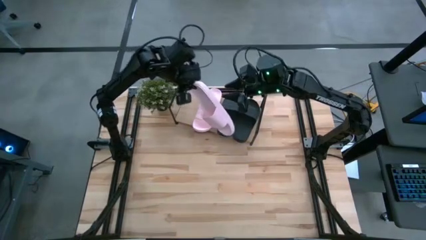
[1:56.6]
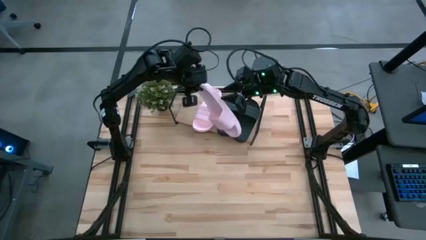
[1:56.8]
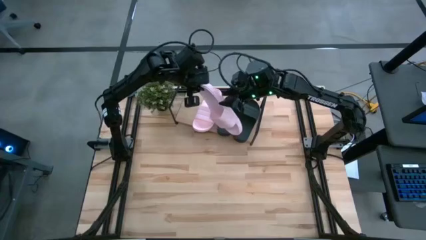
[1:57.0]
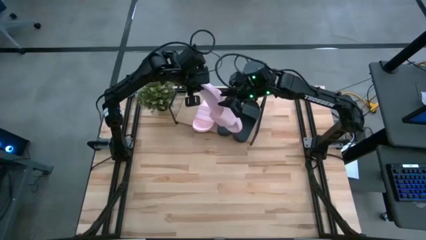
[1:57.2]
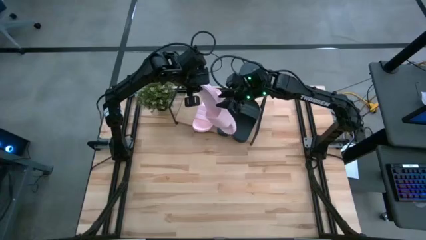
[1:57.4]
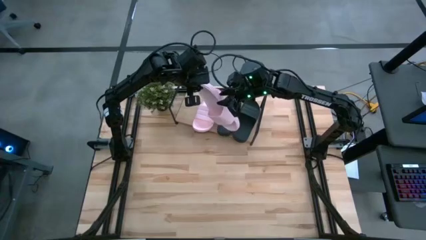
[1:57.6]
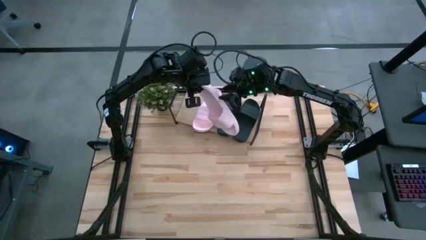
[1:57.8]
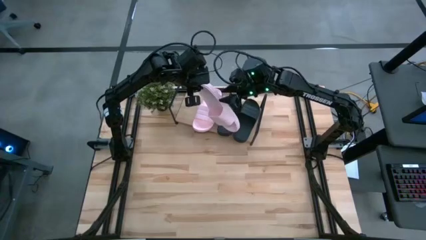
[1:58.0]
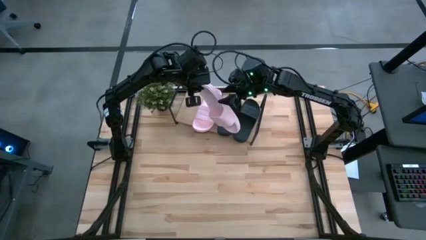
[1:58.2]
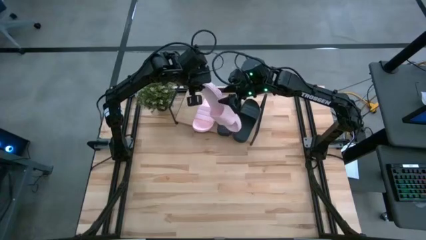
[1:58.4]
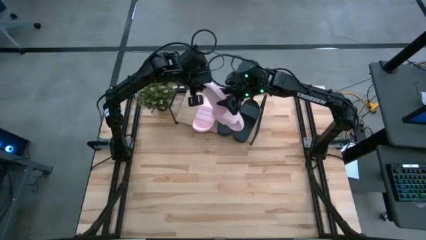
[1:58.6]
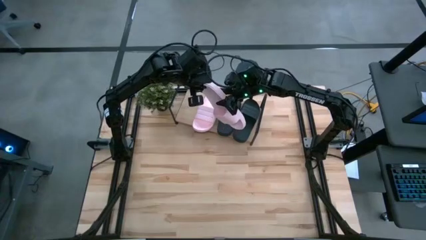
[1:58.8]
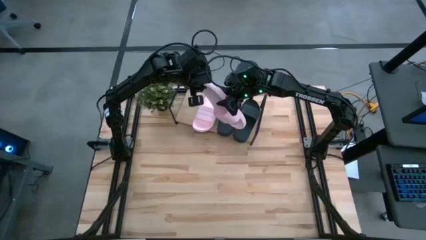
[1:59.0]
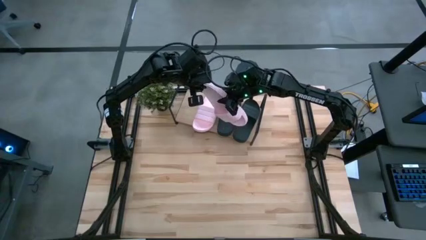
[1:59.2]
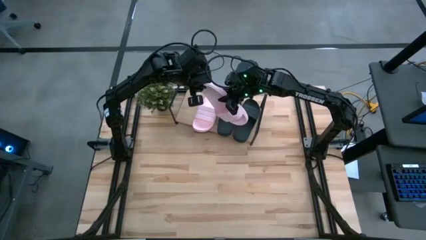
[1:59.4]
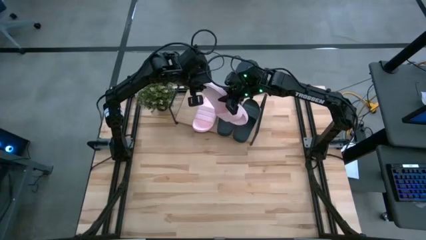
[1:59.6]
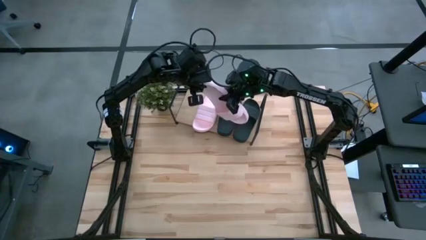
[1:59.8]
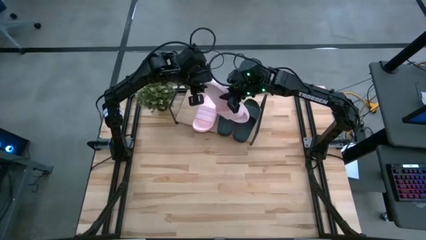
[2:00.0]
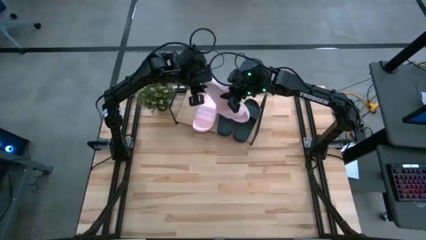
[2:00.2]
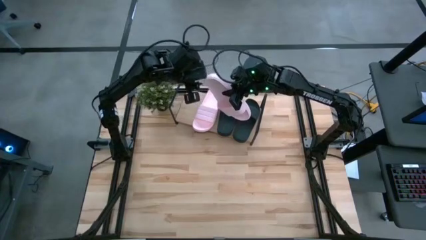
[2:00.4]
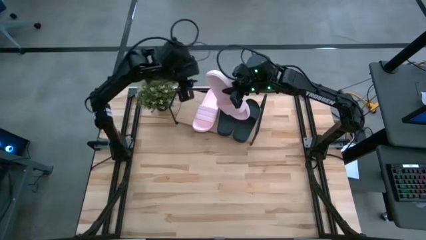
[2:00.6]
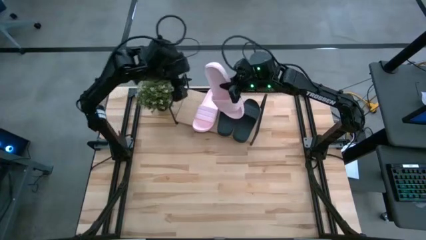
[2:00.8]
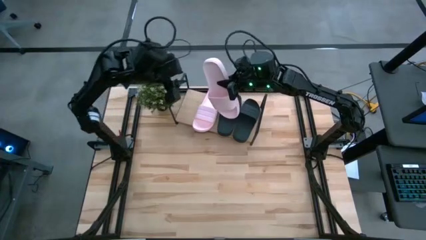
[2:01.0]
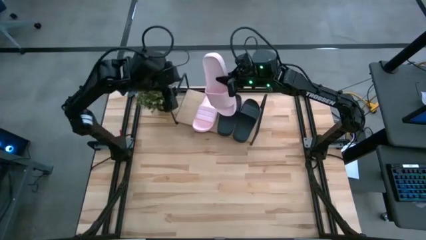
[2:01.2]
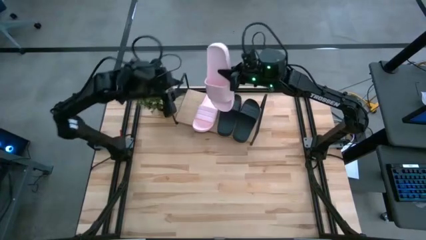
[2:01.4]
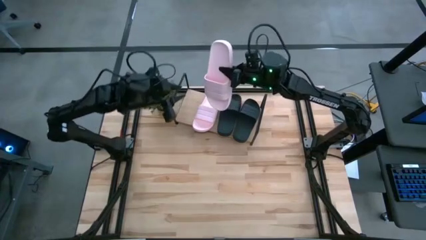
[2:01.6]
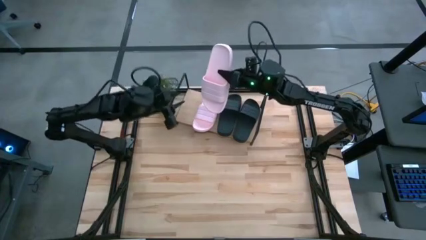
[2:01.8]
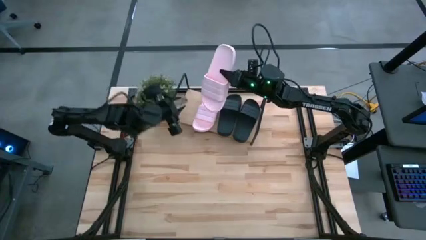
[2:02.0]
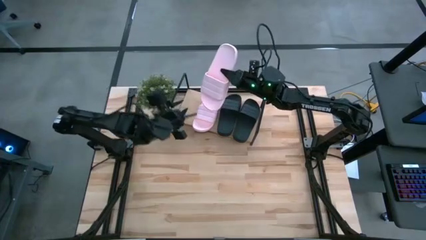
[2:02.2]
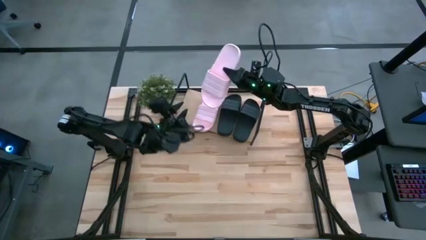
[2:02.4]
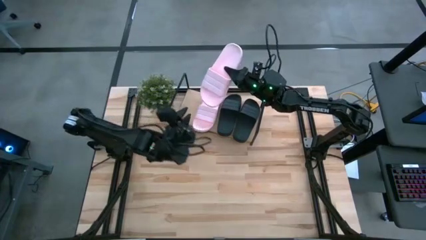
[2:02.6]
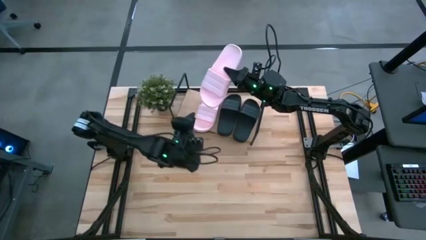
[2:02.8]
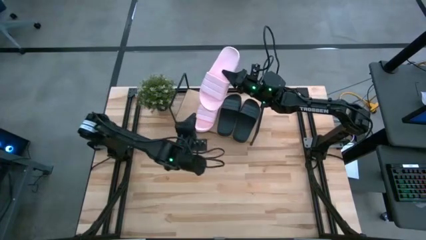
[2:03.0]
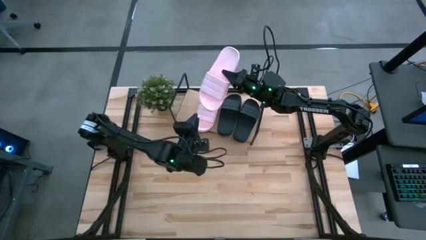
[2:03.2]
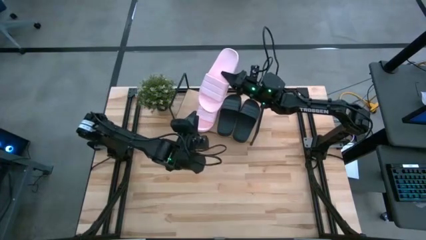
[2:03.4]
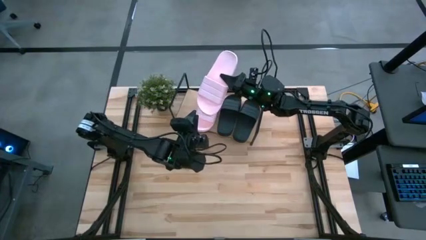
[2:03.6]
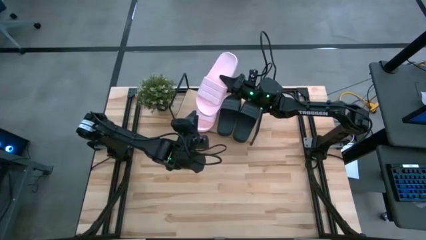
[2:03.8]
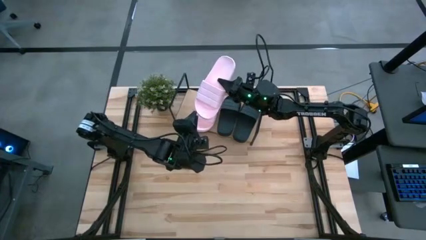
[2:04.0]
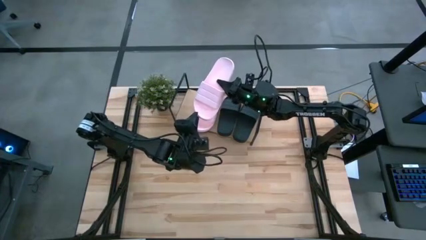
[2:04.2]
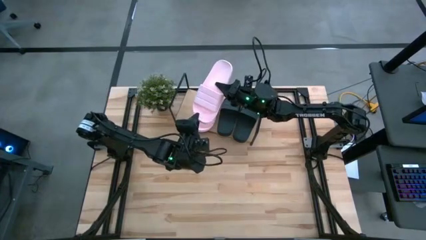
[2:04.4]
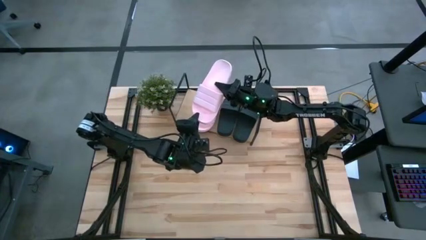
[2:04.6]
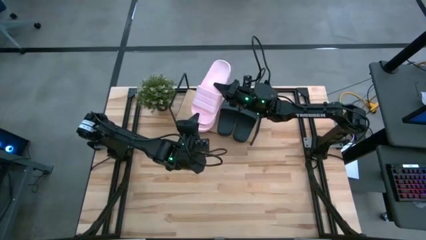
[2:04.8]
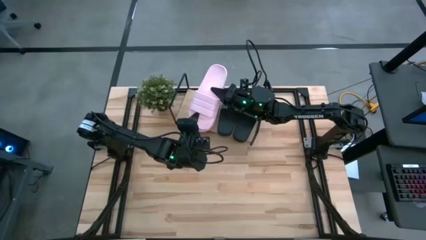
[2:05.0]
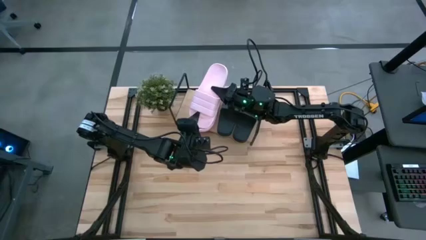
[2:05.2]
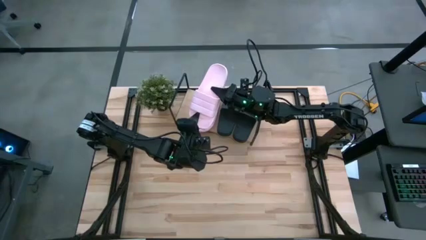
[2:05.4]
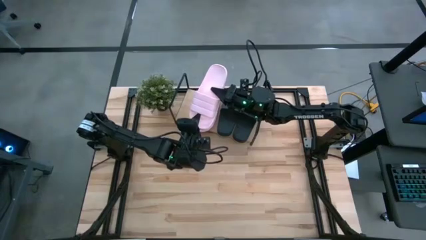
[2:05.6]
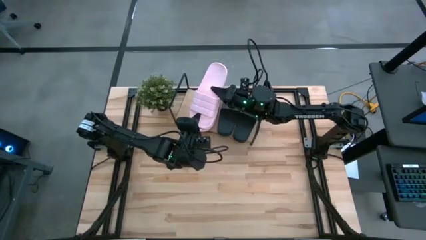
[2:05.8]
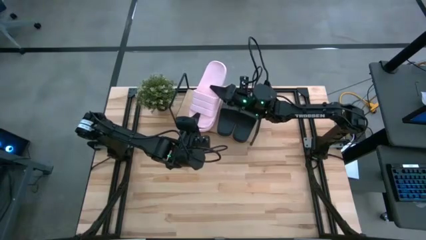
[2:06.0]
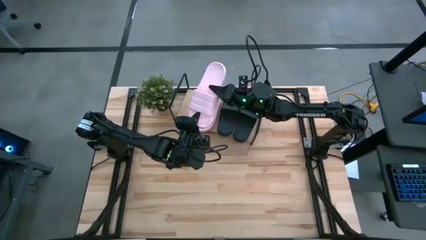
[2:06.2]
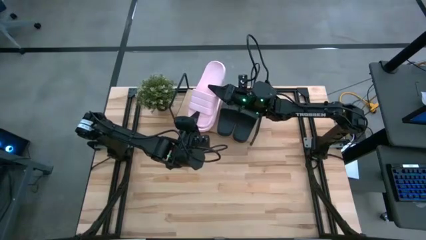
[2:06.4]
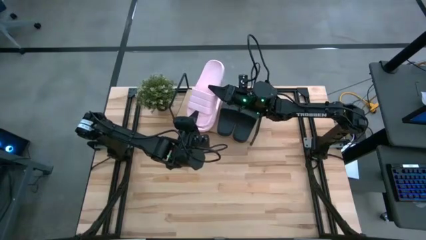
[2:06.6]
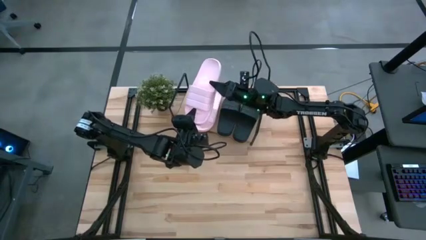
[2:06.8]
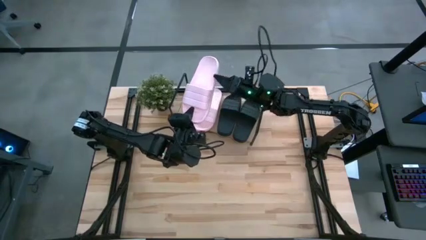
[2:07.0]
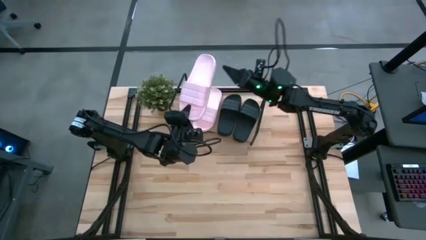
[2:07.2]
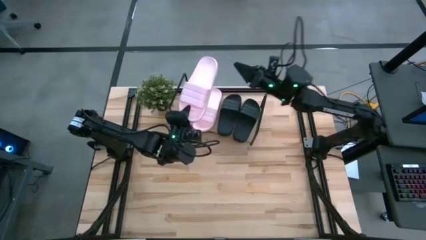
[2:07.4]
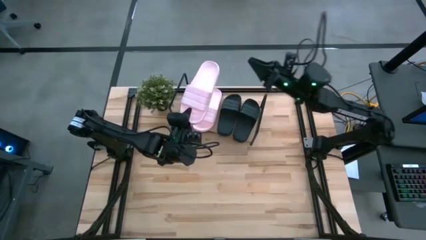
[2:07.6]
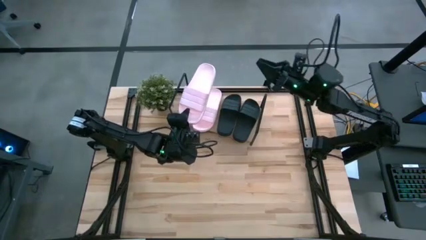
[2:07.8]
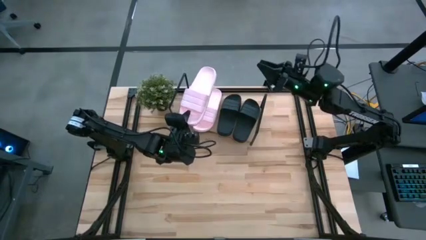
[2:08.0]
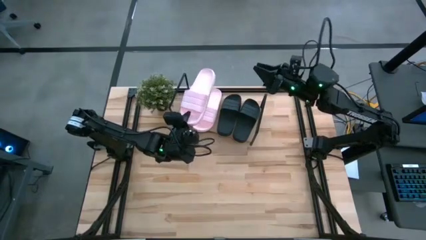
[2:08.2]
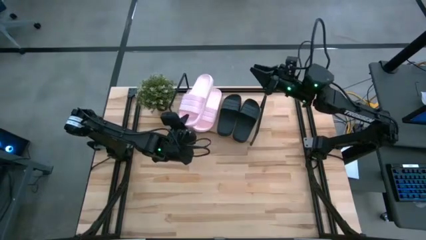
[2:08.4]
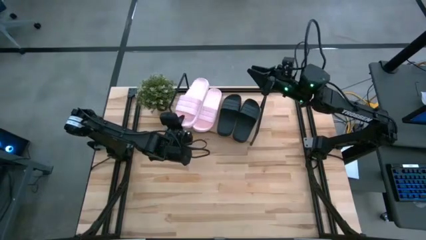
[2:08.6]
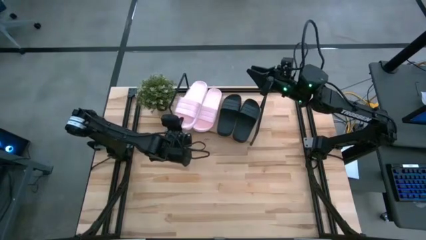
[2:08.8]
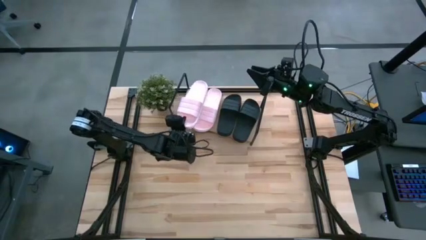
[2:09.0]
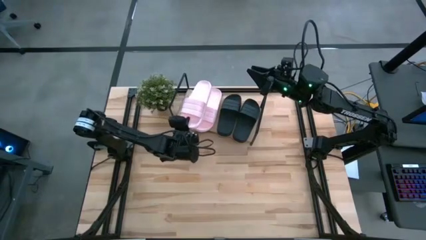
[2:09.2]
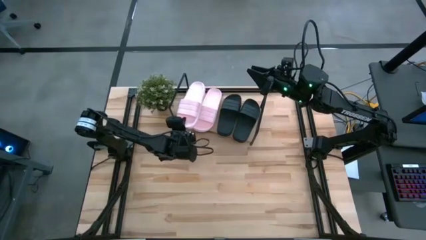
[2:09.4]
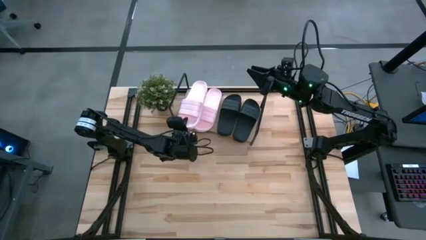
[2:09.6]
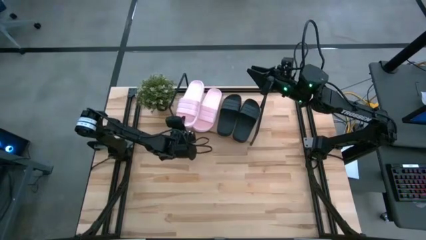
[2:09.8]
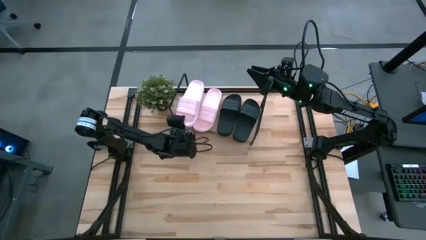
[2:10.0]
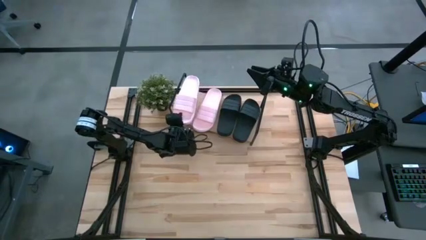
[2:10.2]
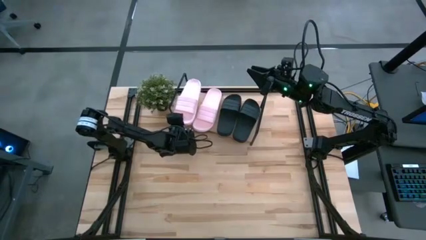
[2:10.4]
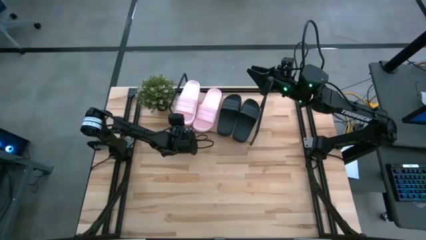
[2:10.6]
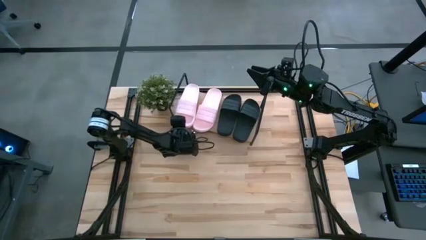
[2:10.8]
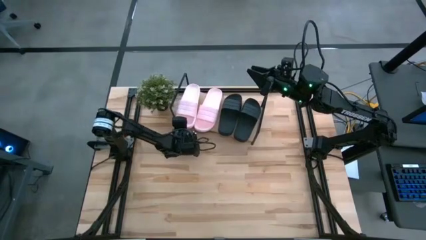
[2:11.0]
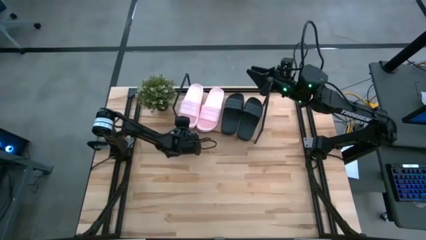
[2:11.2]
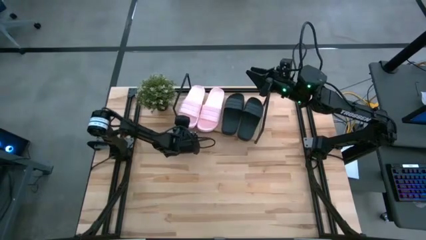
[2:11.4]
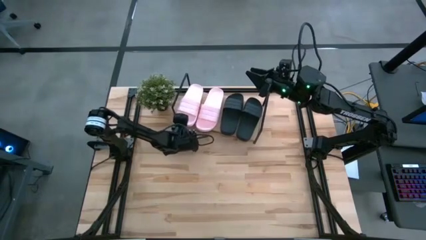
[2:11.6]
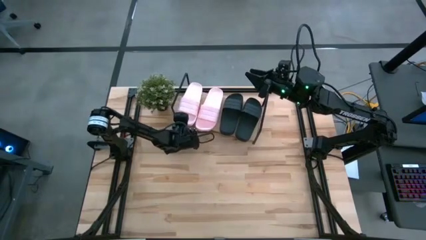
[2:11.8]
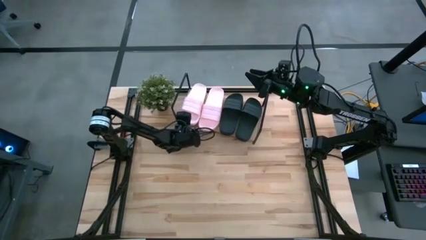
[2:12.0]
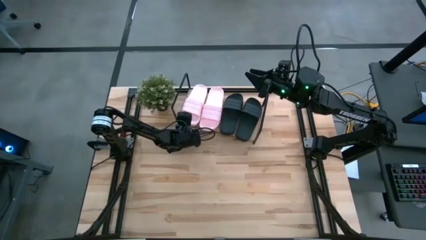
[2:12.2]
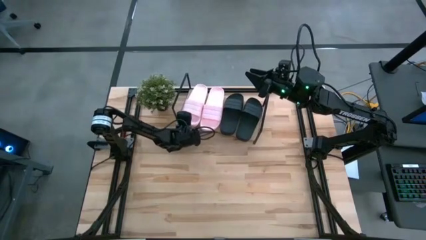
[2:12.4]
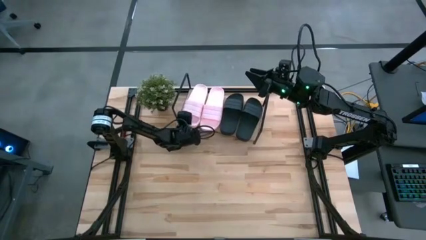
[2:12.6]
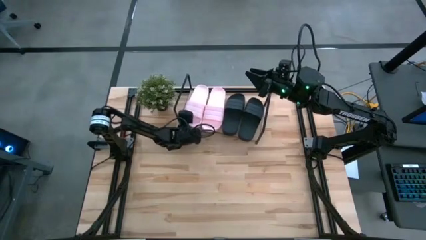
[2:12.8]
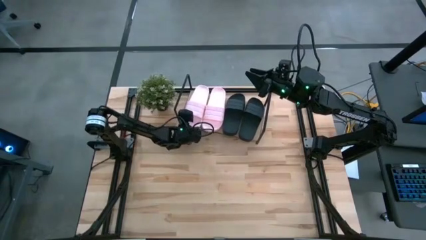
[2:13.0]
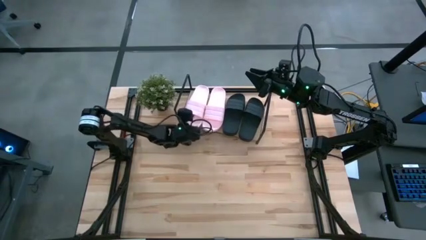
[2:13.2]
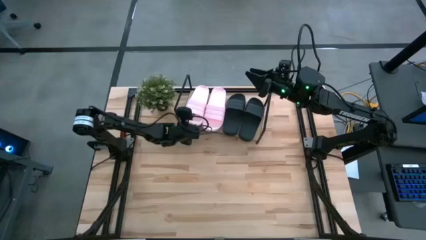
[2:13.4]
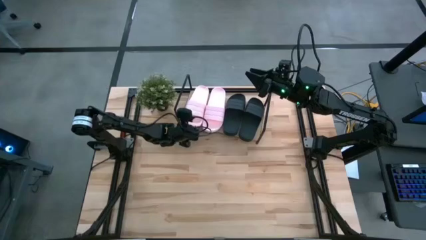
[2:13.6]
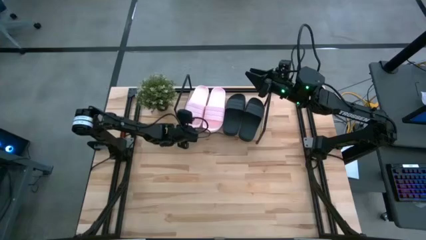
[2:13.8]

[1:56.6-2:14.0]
Task: Pick and place slides into the shelf
Put the pink slipper on the shelf
